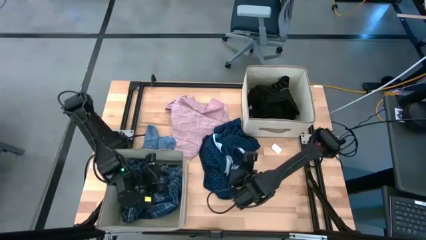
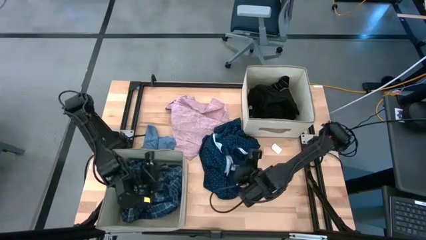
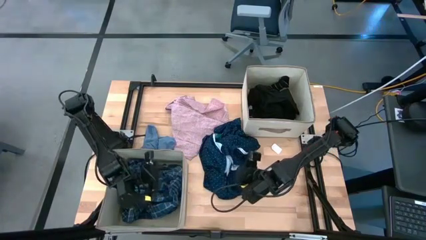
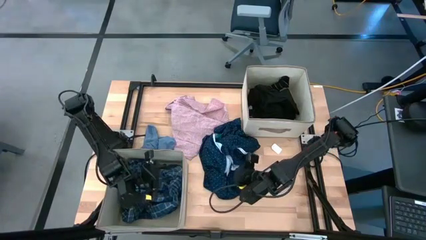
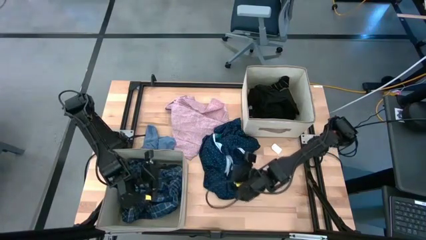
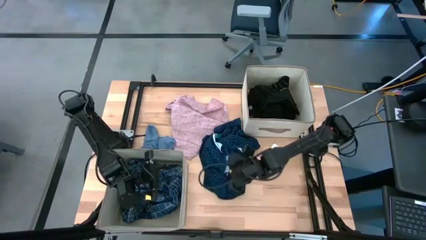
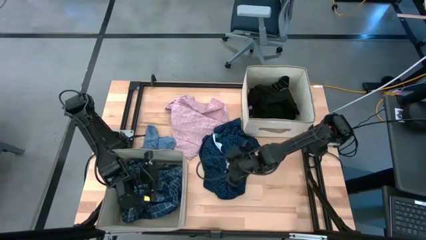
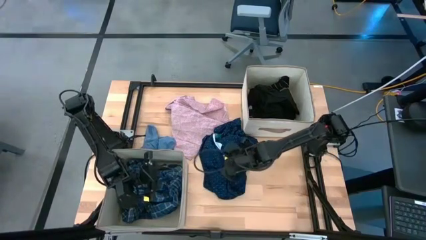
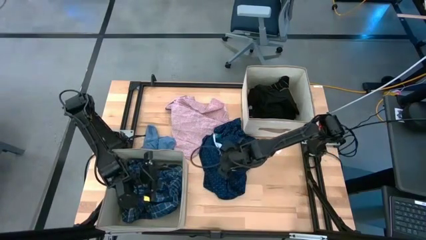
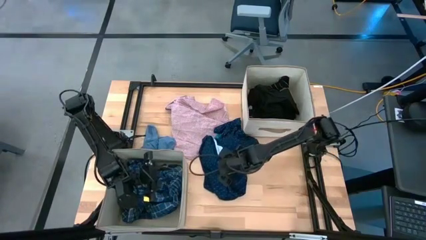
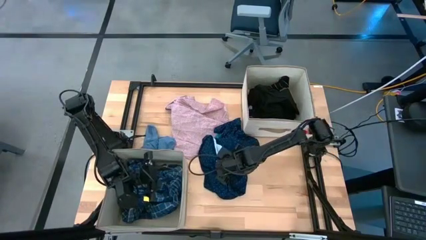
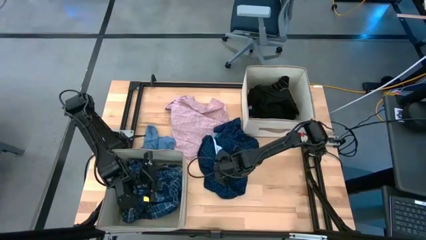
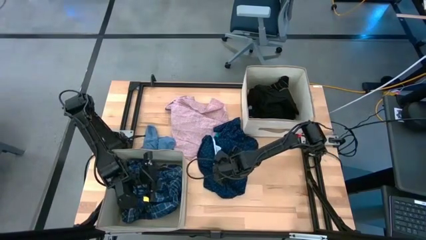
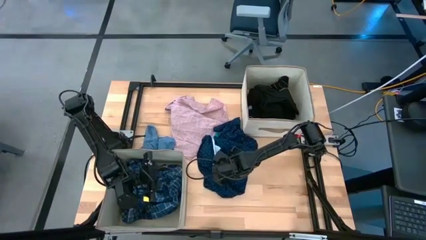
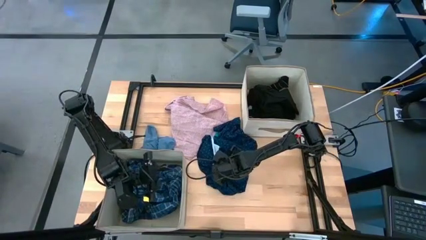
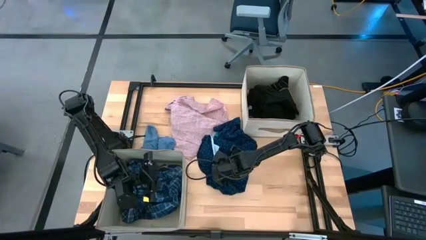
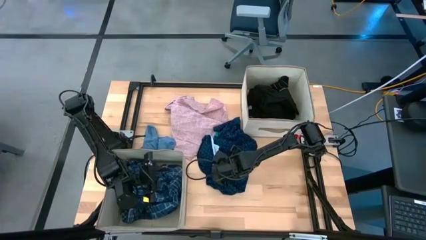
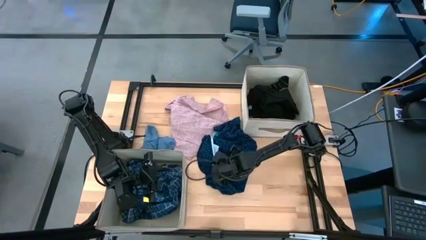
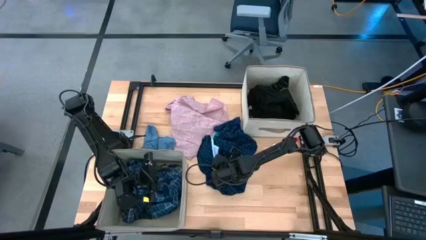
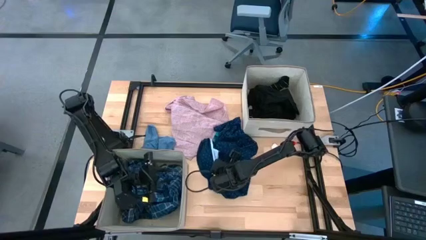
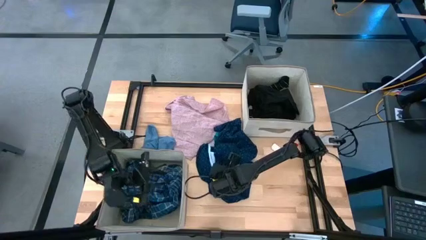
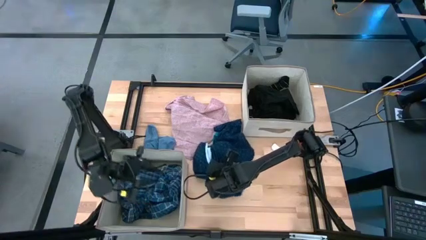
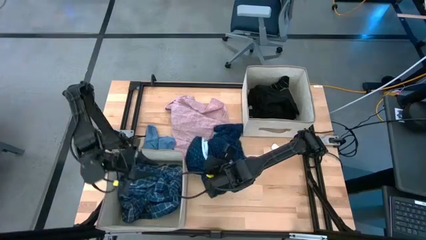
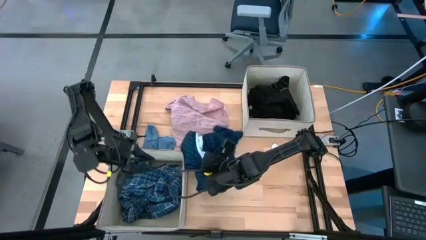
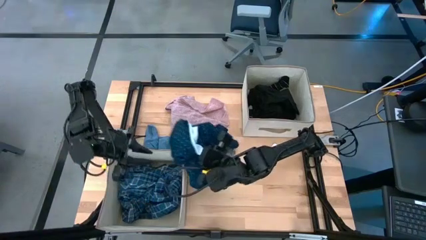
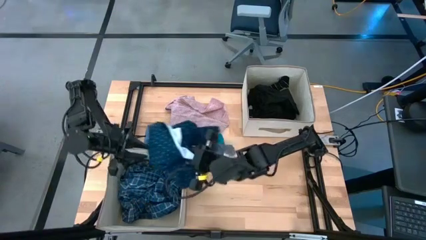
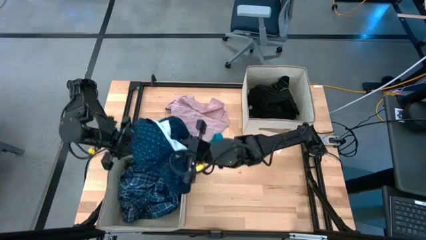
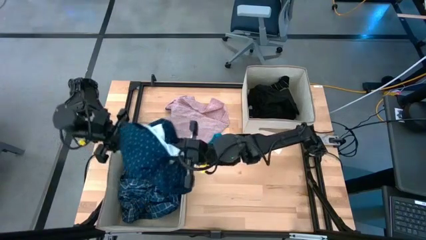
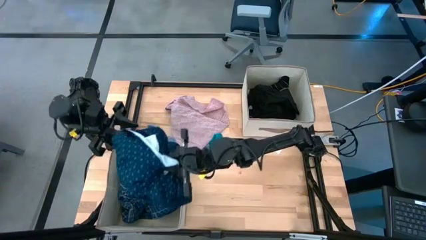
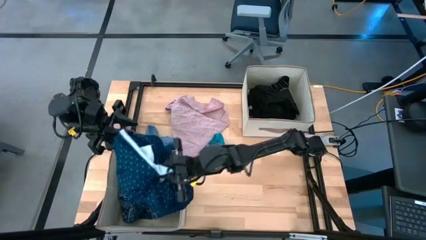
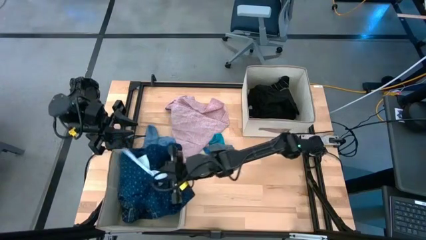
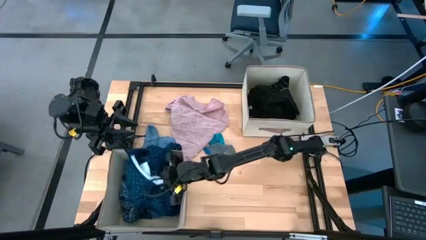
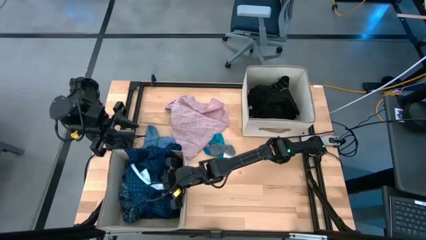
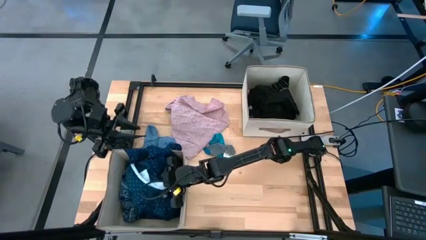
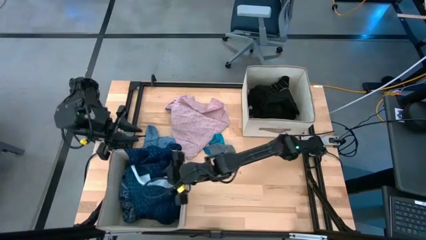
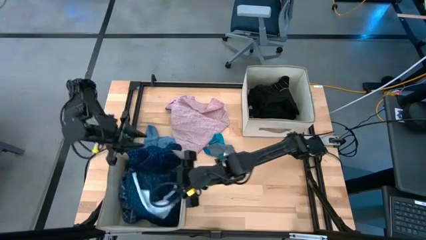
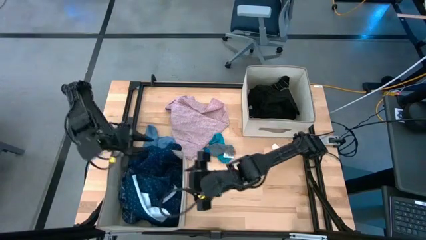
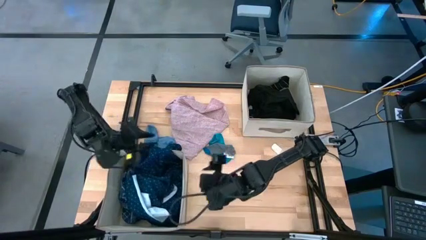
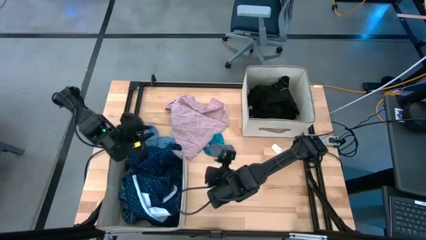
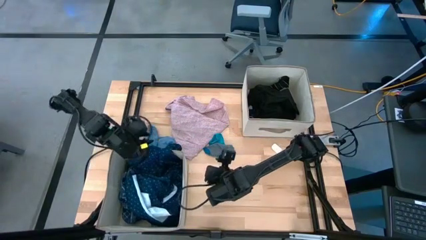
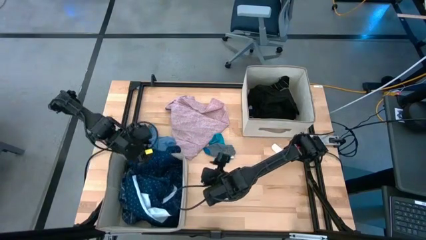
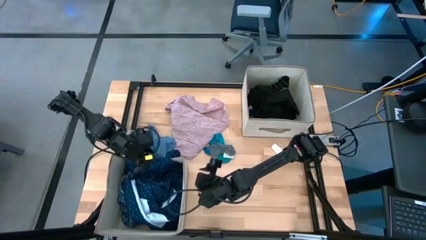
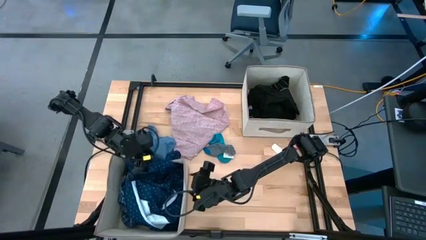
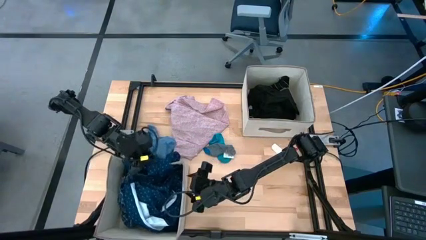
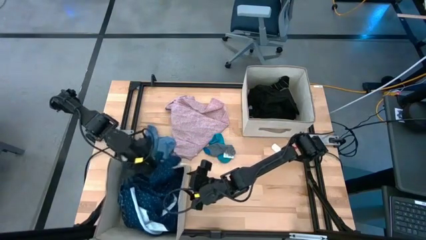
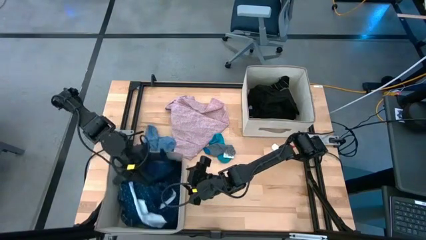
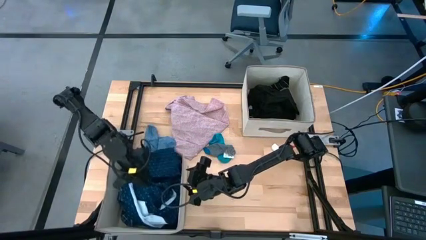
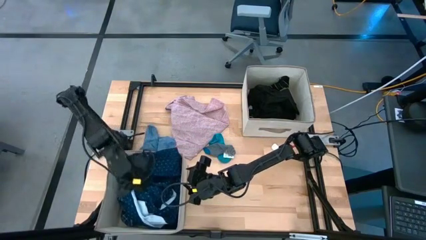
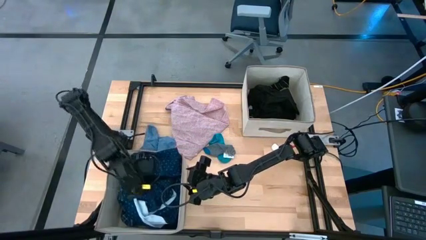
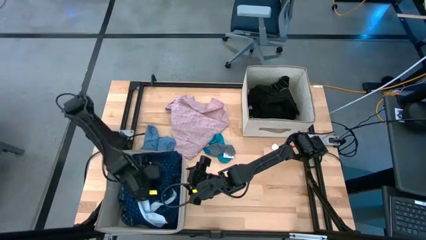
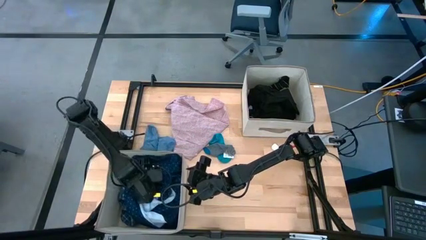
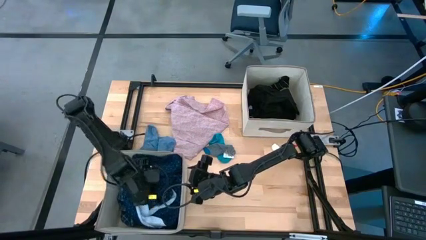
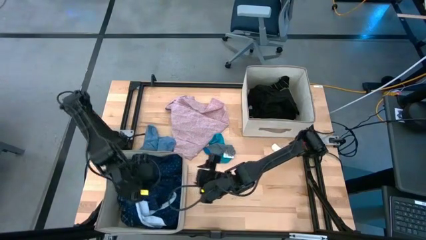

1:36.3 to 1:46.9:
Task: Sort clothes
Put the dark blue shirt into the bottom white laundry organizer

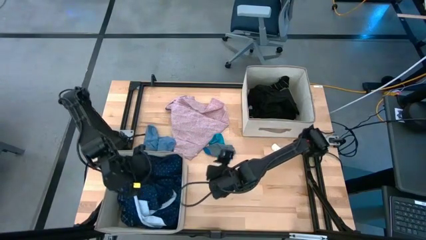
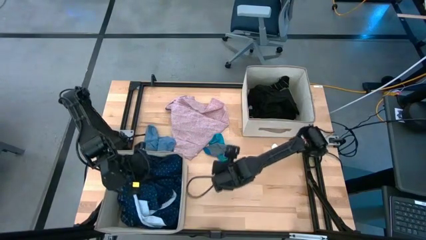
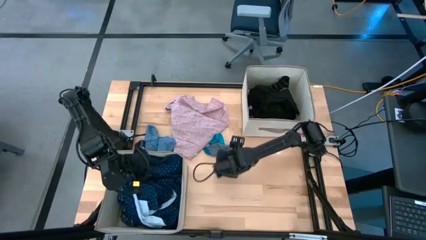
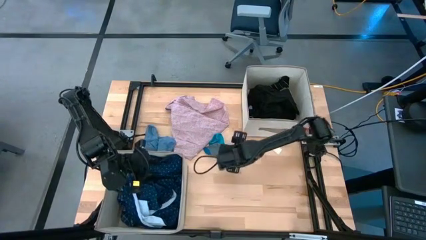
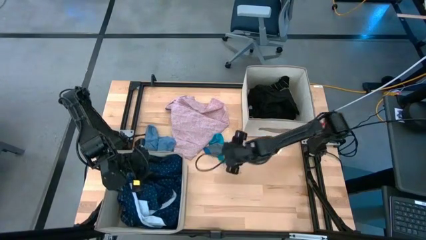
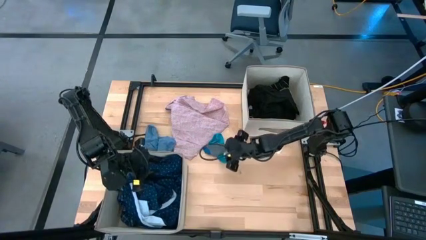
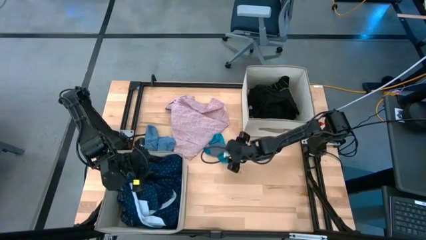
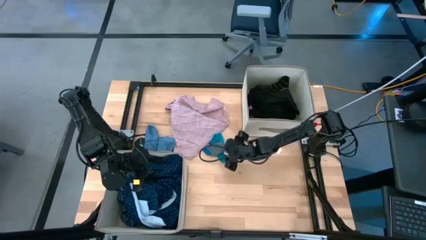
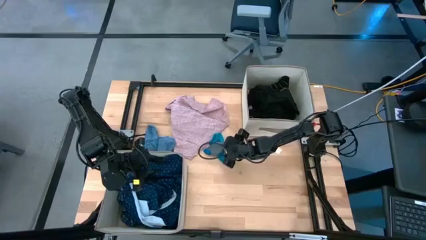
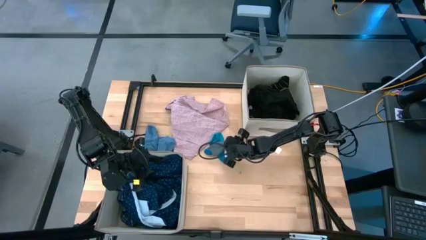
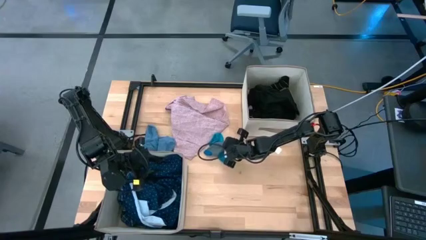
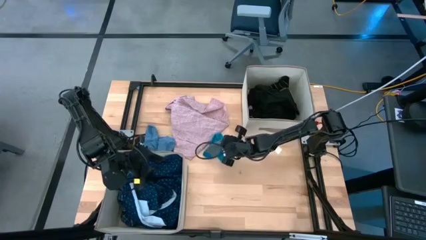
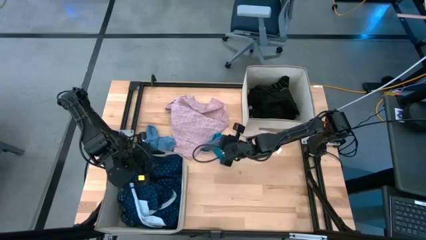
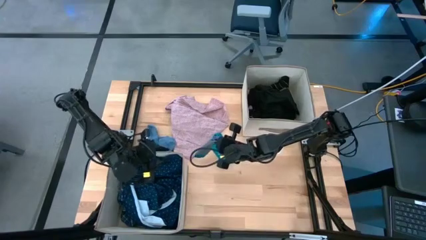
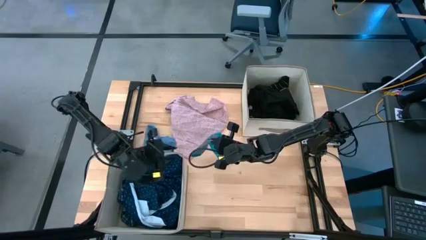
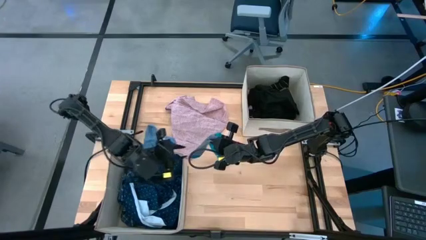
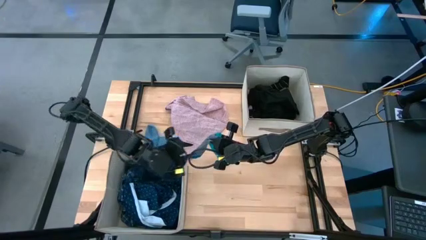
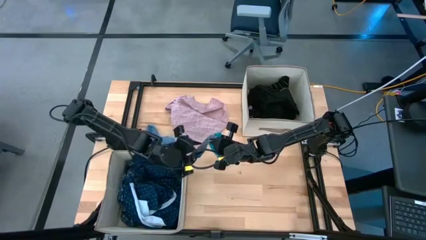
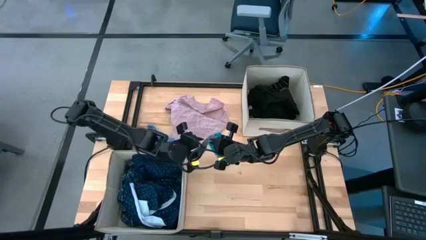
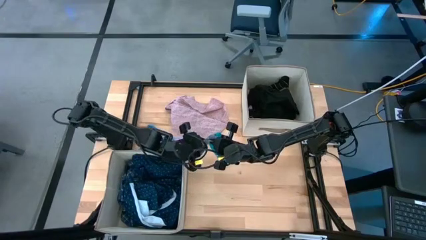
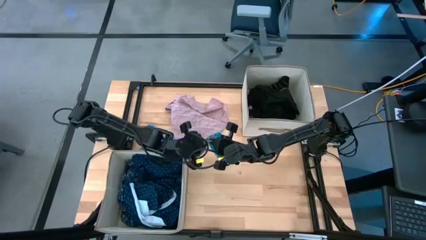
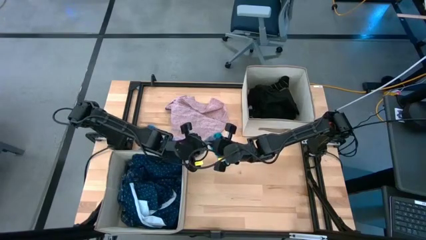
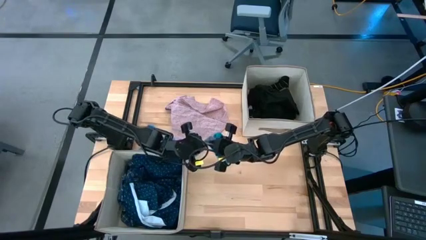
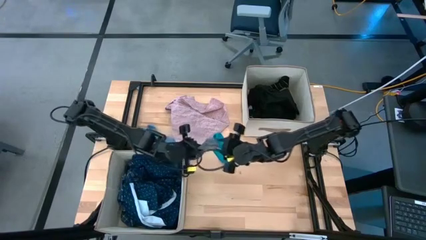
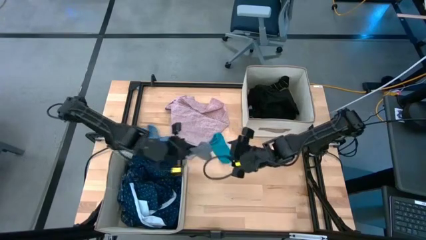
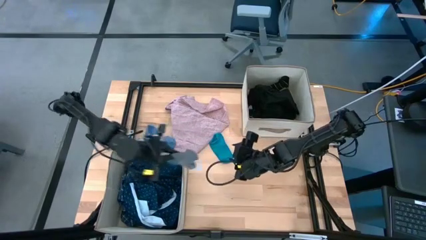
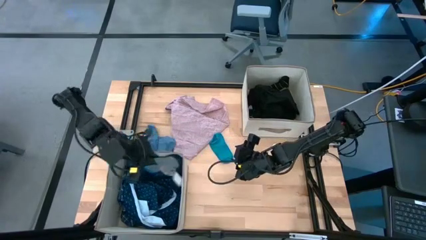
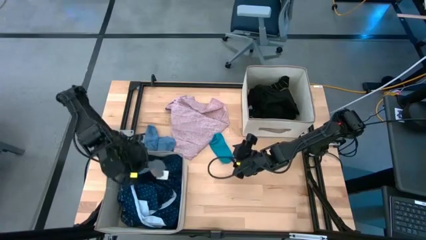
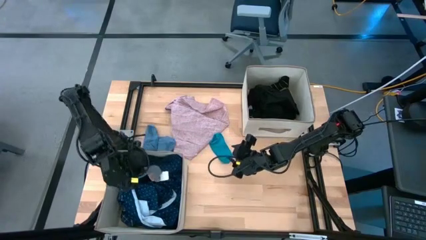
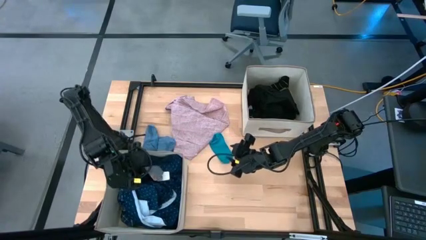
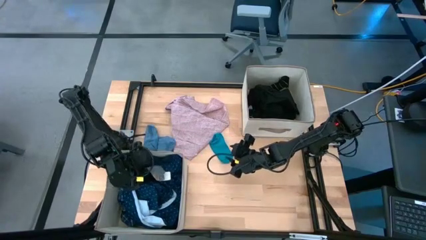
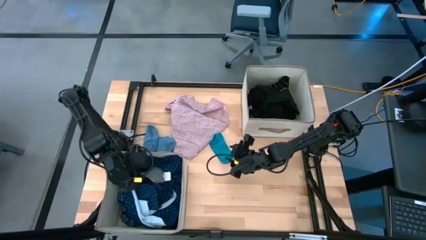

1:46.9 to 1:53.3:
Put the gray sock into the bottom white laundry organizer
